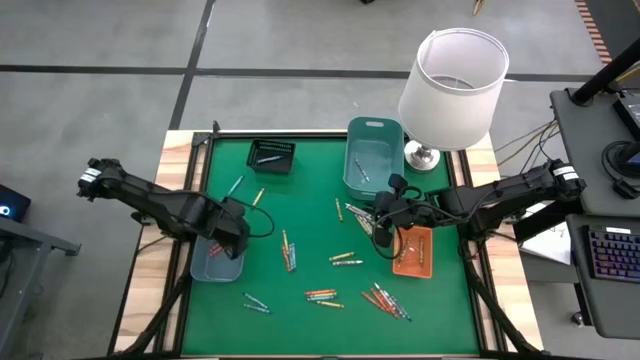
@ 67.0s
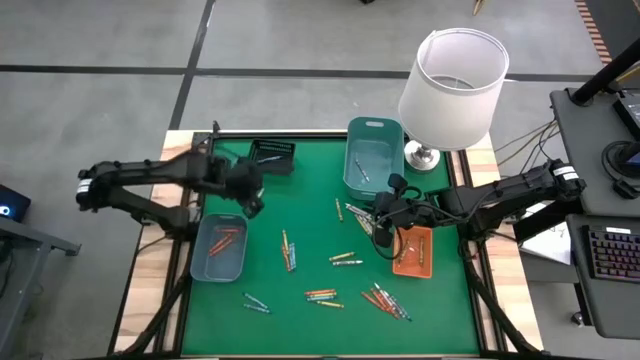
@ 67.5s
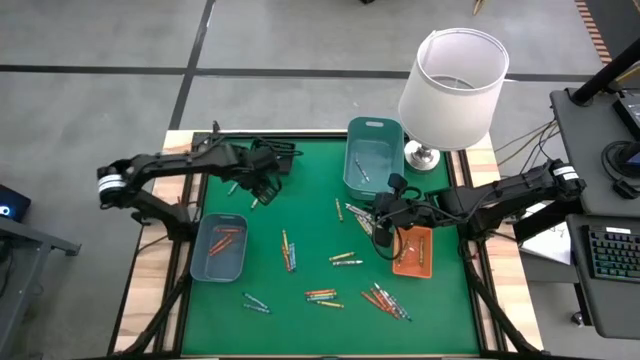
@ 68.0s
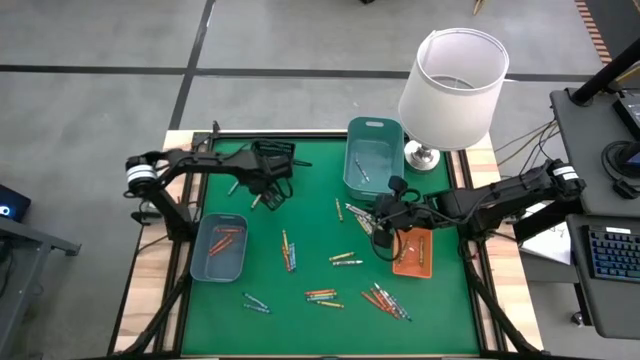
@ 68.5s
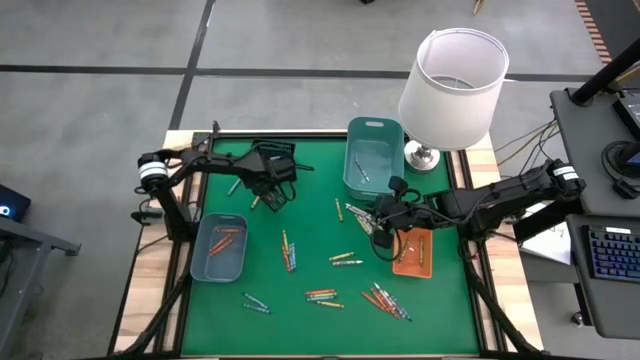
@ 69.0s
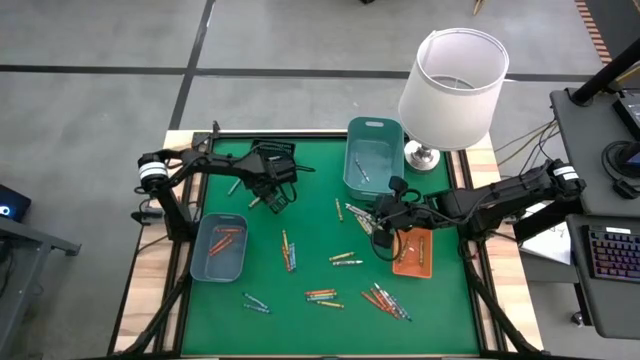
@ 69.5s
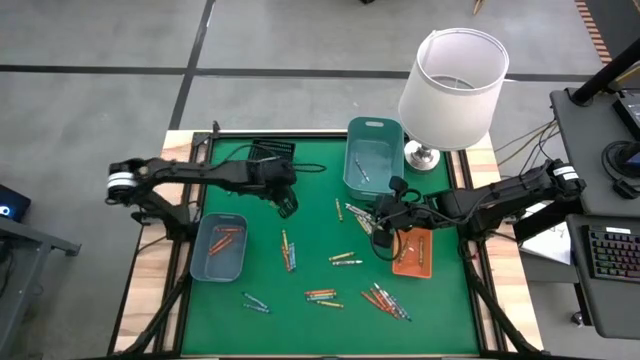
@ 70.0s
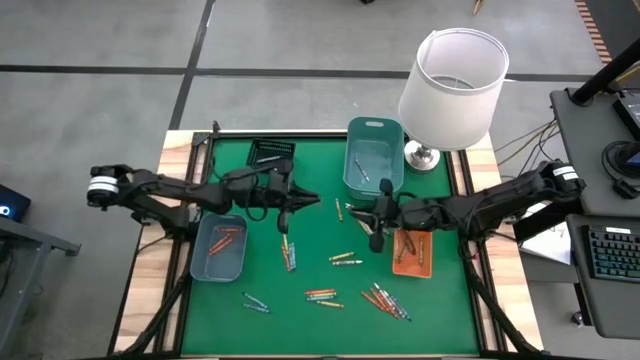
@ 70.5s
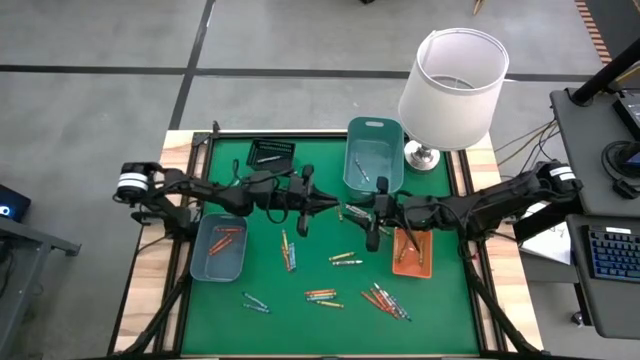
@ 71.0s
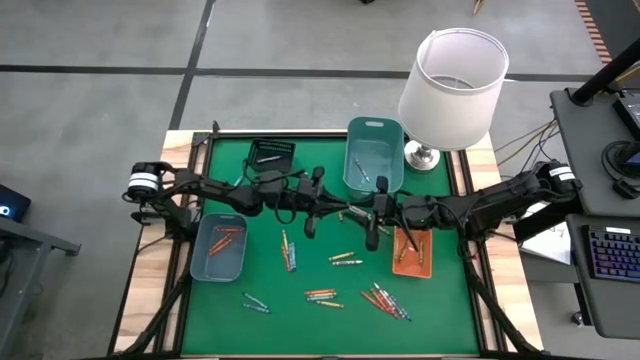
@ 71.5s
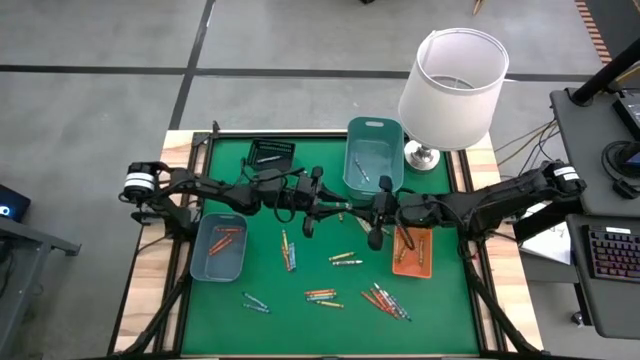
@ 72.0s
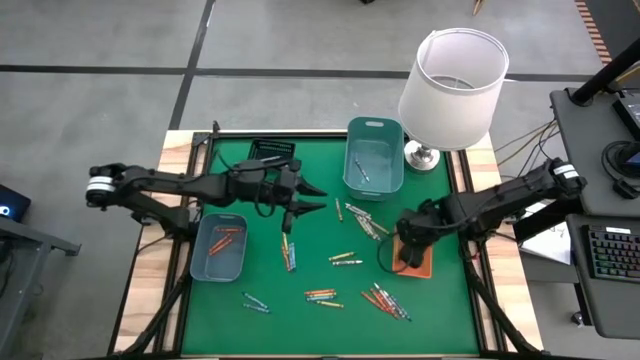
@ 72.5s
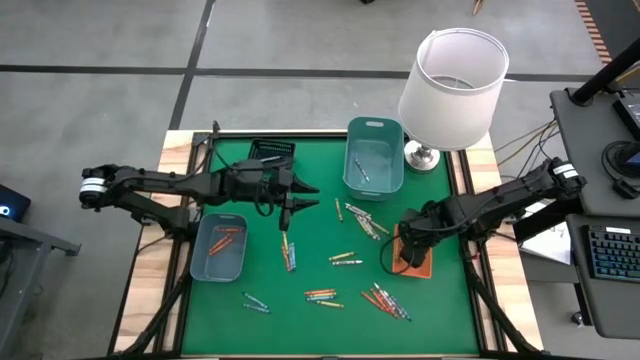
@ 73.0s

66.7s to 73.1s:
Task: Sort crayons
Put the green crayon into the orange bin

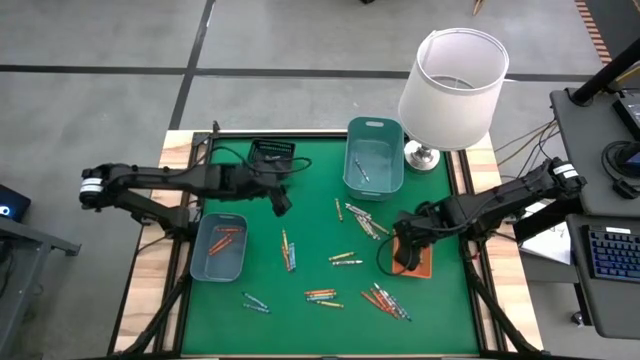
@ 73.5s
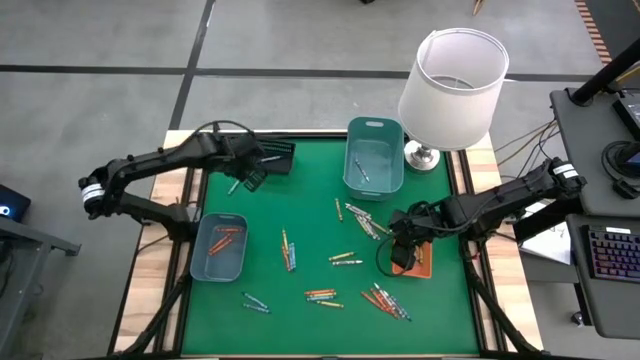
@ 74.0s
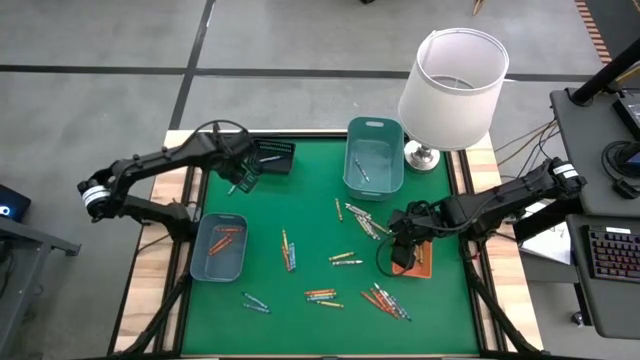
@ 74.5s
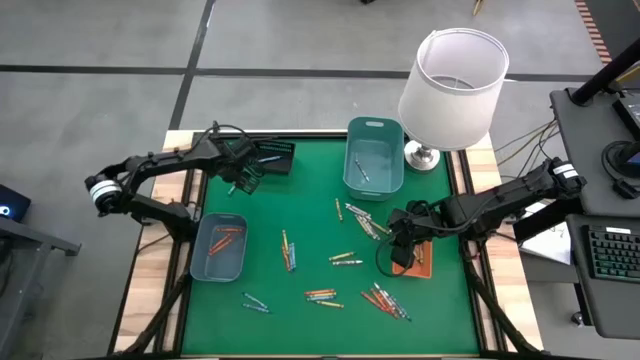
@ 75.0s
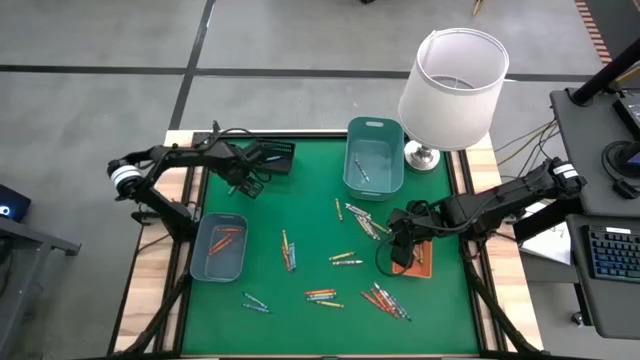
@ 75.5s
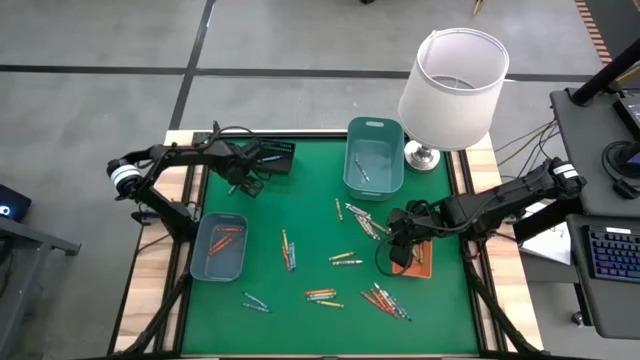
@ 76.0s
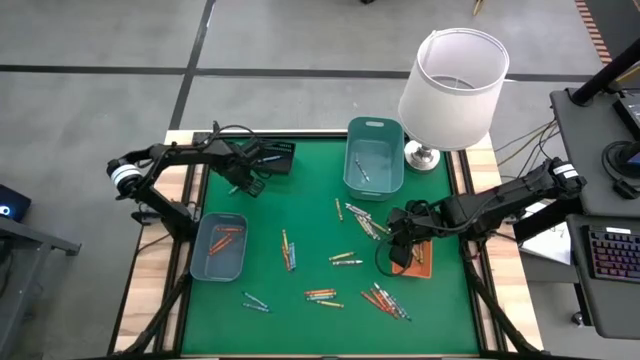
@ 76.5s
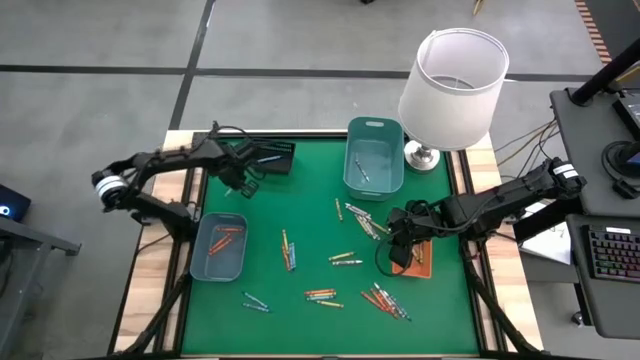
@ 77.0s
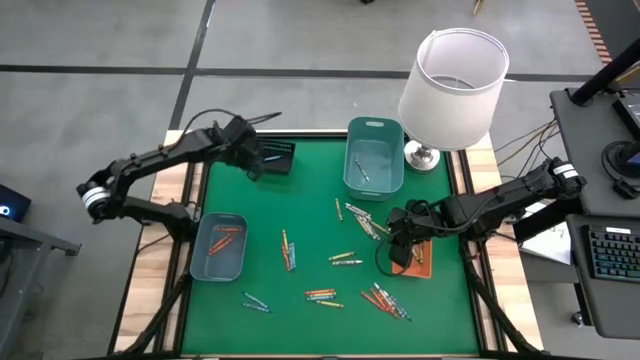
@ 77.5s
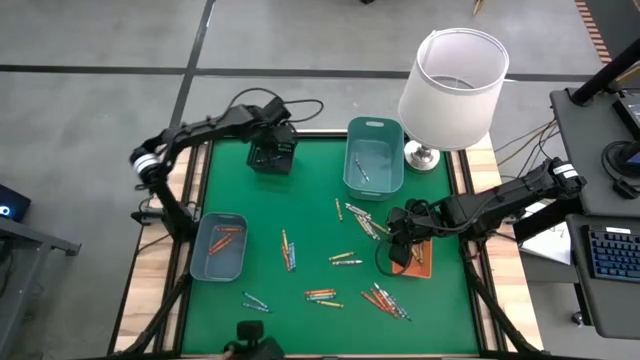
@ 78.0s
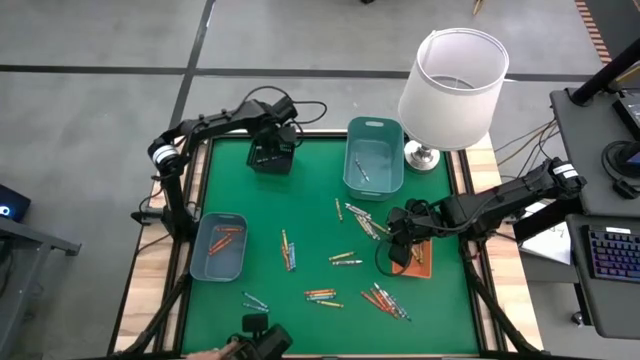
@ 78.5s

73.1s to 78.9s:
Put the blue crayon into the black bin

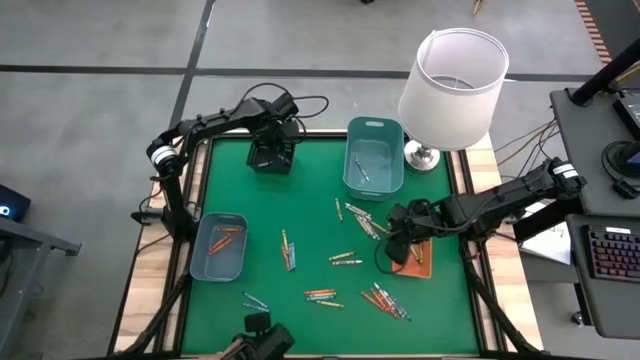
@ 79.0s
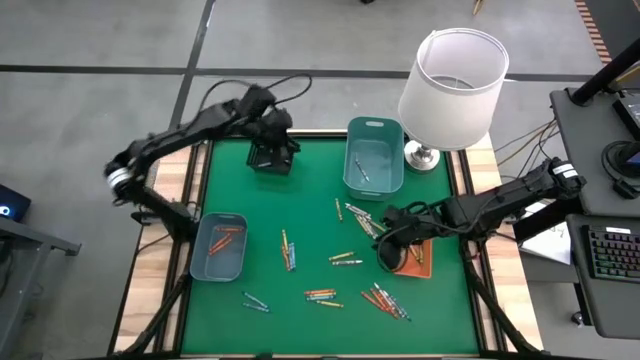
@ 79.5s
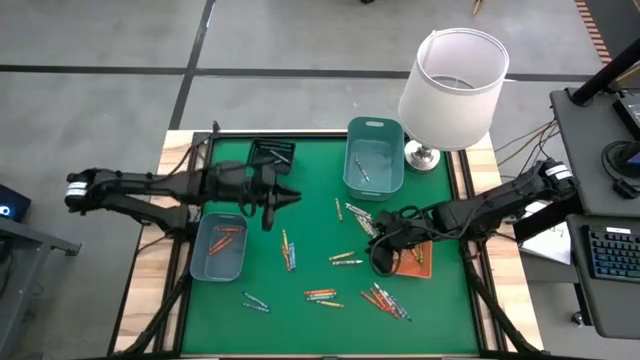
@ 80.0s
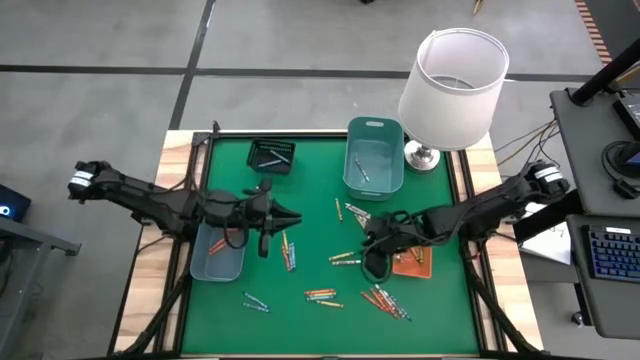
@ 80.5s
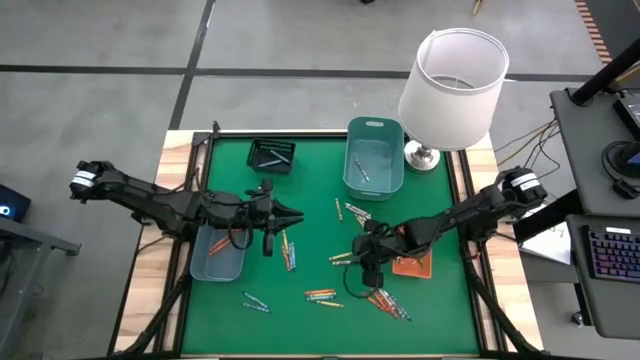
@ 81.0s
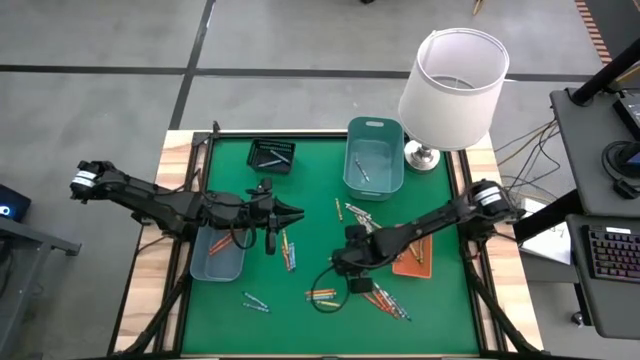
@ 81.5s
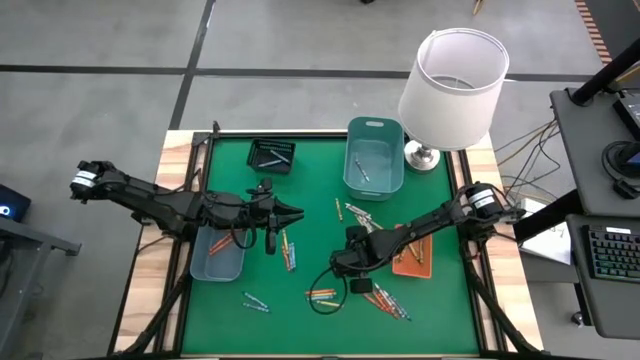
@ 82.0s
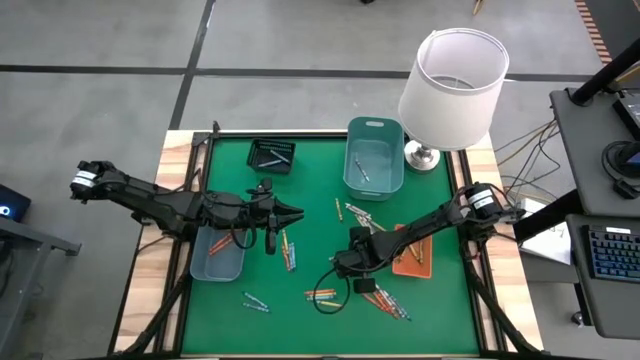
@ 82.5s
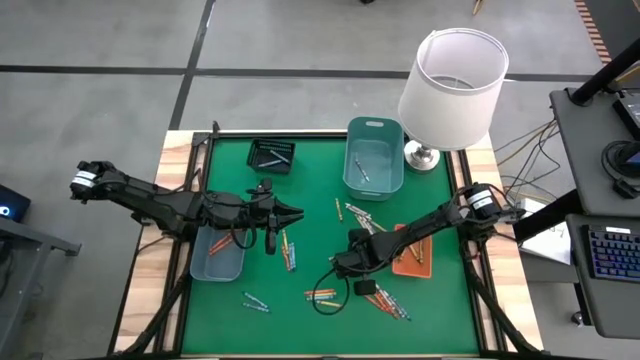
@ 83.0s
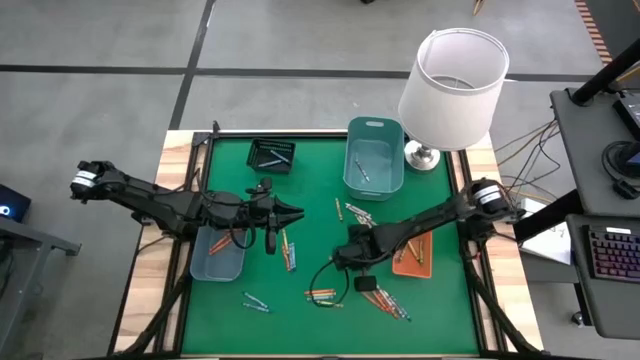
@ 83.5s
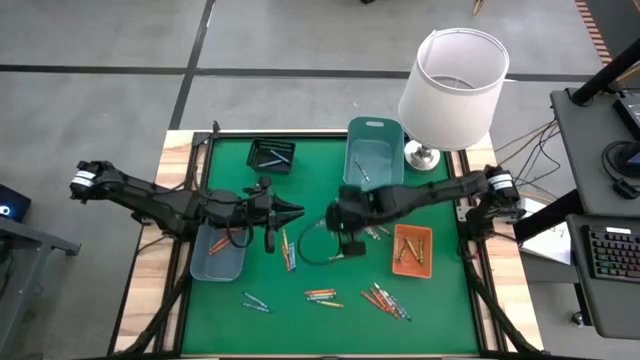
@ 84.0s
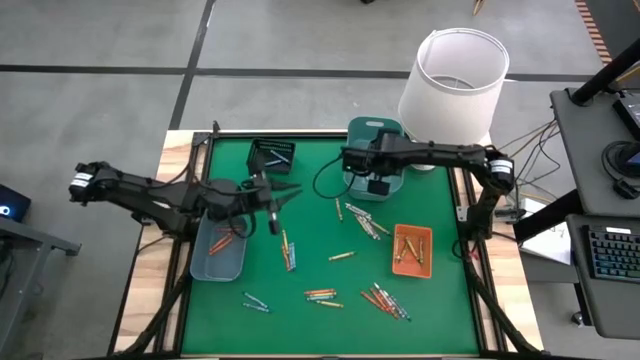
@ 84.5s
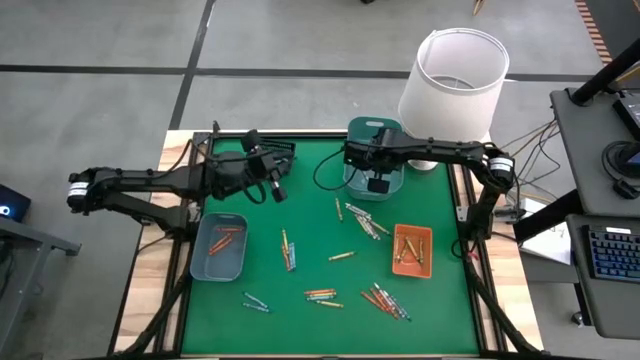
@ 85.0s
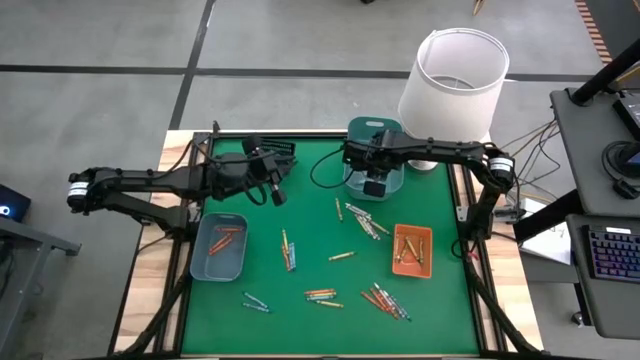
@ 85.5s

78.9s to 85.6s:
Put the white crayon into the green bin
